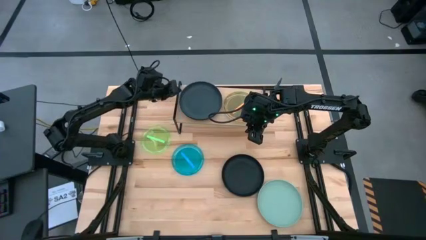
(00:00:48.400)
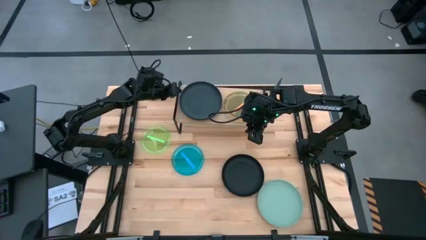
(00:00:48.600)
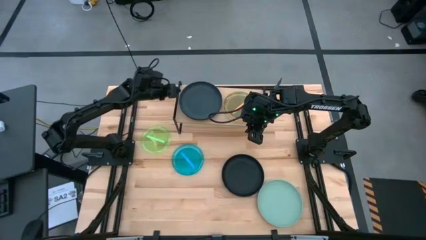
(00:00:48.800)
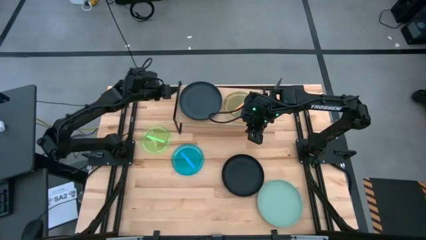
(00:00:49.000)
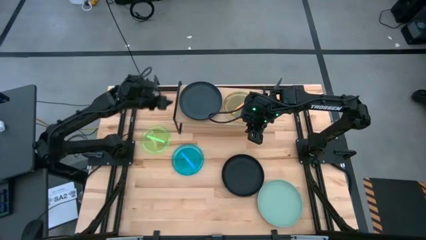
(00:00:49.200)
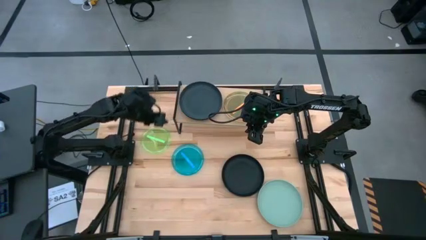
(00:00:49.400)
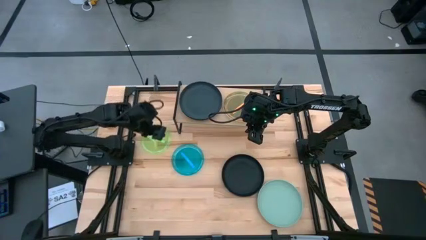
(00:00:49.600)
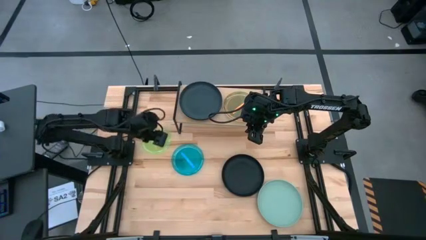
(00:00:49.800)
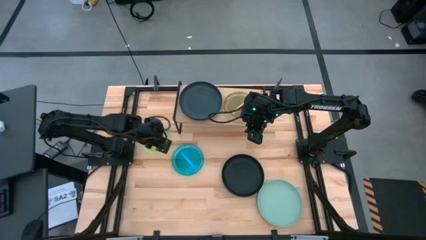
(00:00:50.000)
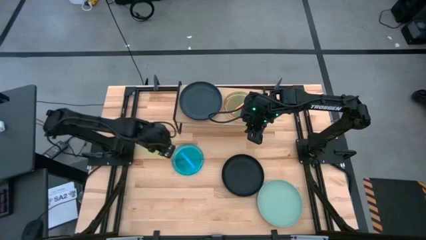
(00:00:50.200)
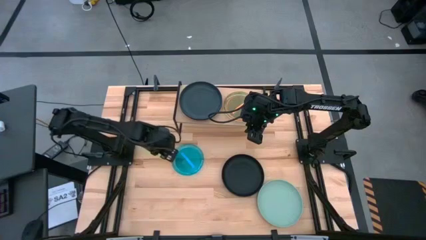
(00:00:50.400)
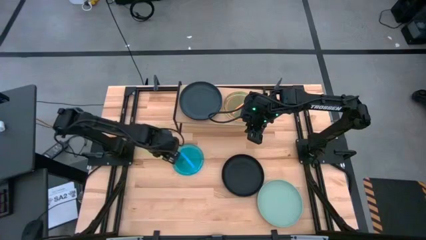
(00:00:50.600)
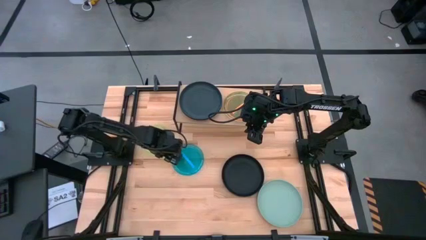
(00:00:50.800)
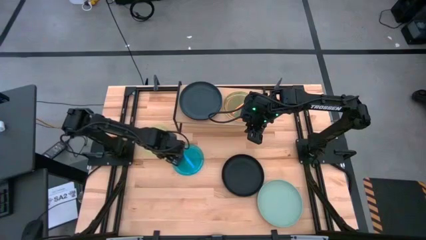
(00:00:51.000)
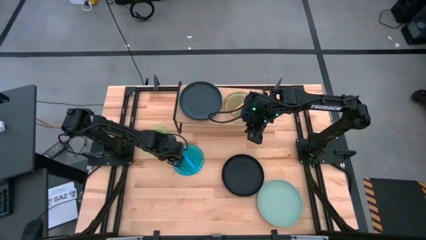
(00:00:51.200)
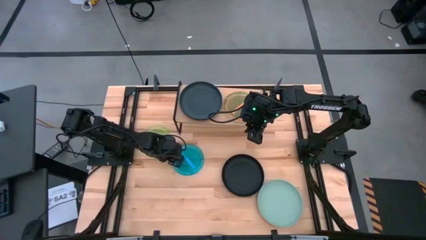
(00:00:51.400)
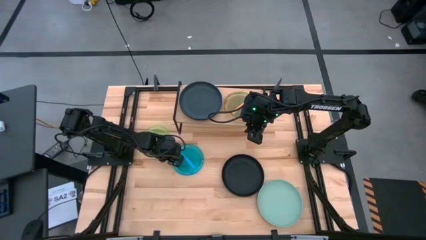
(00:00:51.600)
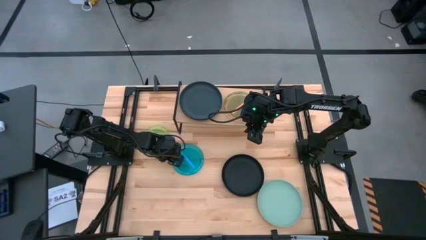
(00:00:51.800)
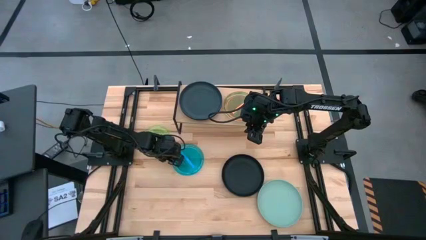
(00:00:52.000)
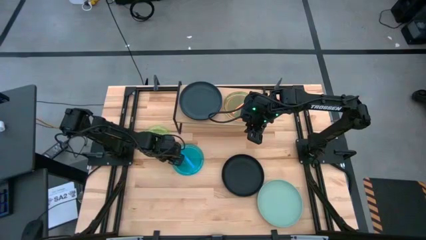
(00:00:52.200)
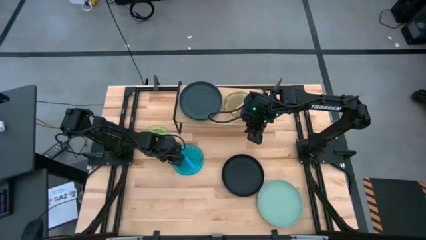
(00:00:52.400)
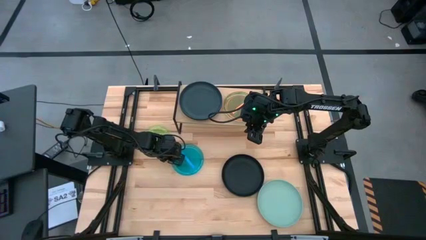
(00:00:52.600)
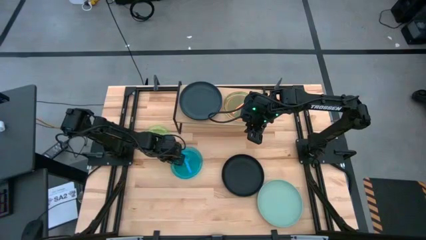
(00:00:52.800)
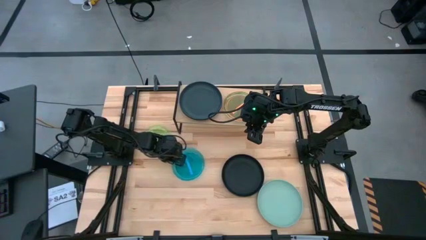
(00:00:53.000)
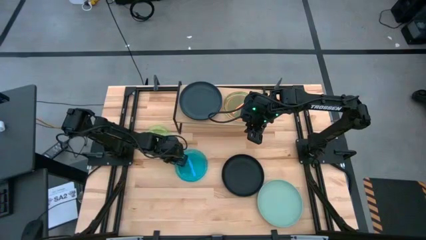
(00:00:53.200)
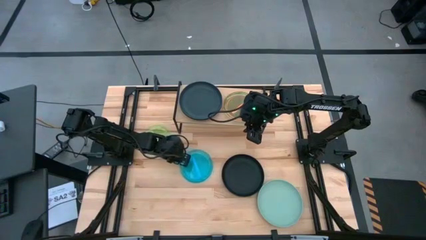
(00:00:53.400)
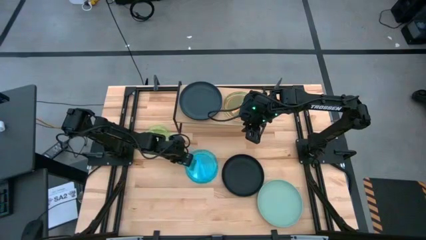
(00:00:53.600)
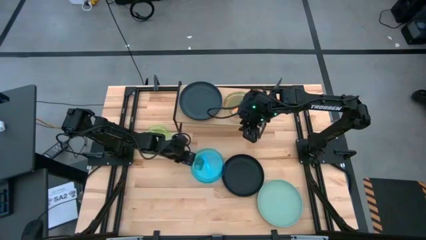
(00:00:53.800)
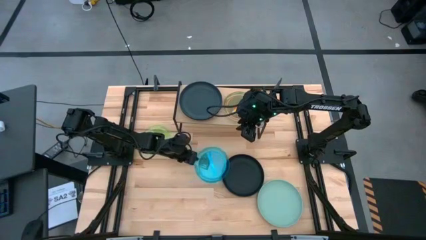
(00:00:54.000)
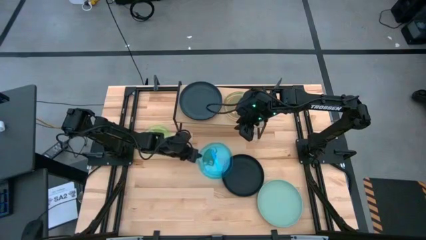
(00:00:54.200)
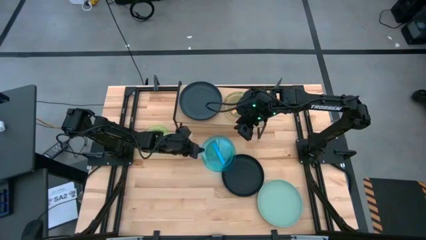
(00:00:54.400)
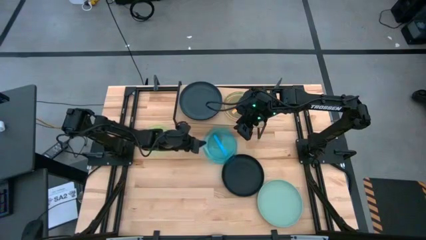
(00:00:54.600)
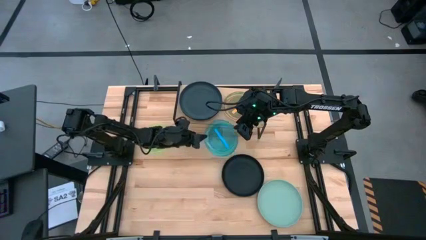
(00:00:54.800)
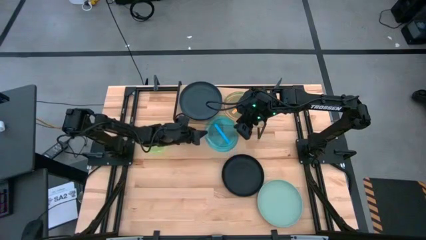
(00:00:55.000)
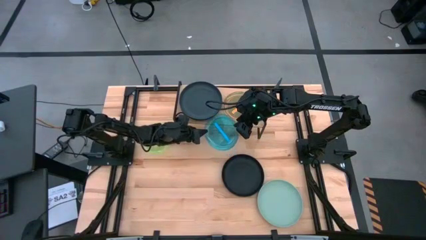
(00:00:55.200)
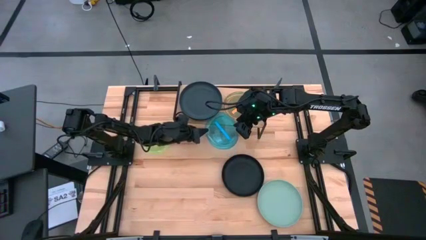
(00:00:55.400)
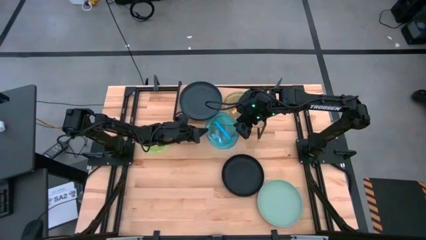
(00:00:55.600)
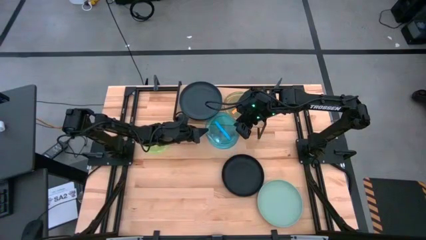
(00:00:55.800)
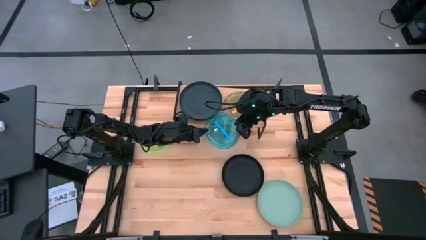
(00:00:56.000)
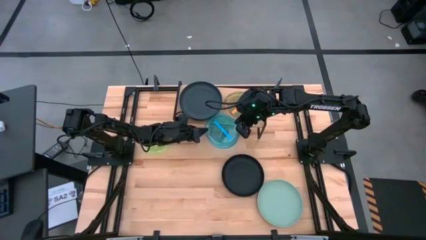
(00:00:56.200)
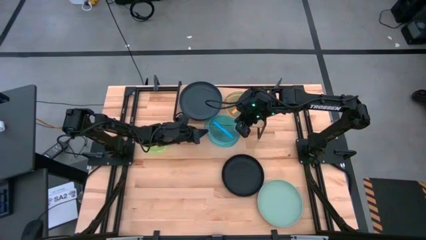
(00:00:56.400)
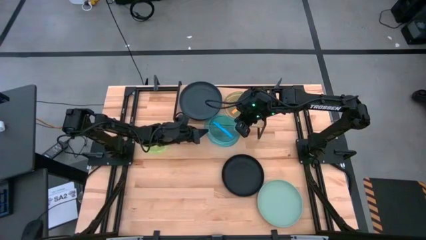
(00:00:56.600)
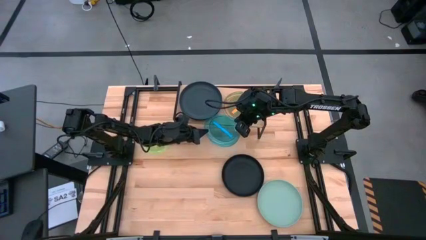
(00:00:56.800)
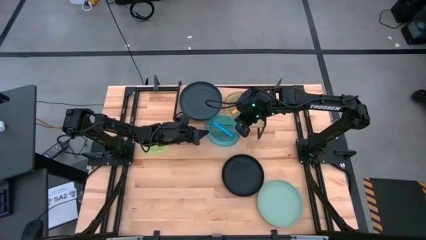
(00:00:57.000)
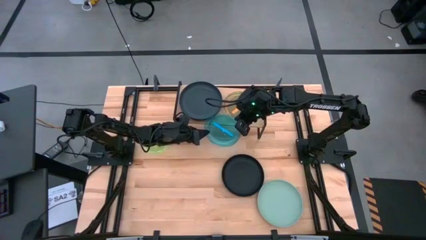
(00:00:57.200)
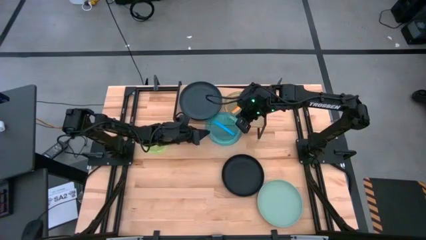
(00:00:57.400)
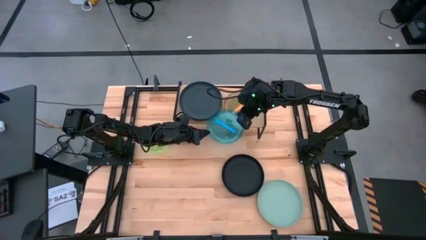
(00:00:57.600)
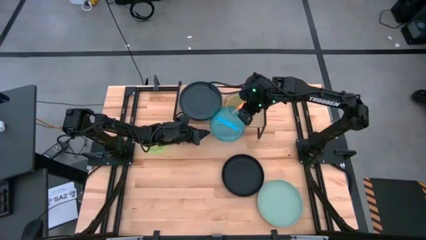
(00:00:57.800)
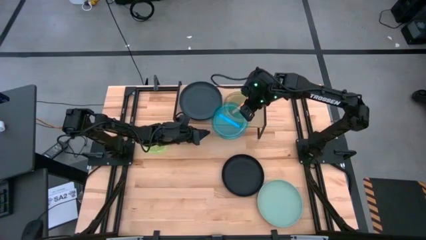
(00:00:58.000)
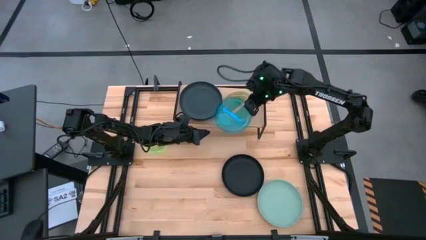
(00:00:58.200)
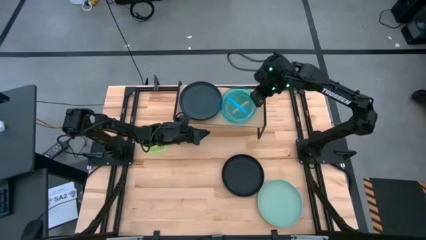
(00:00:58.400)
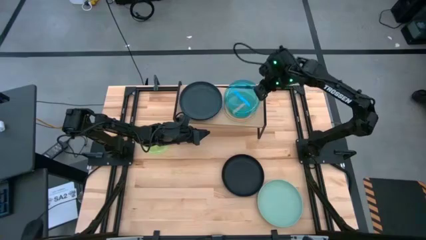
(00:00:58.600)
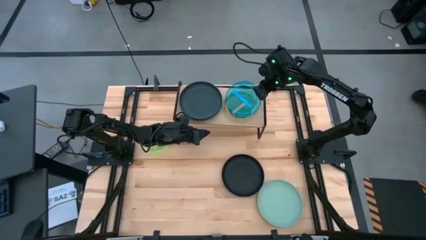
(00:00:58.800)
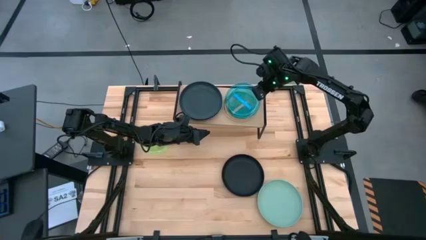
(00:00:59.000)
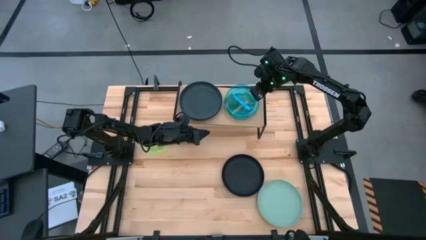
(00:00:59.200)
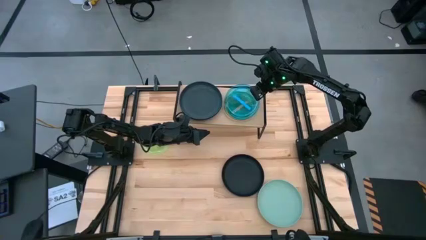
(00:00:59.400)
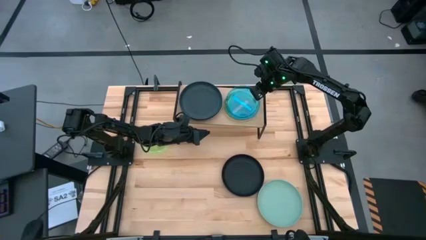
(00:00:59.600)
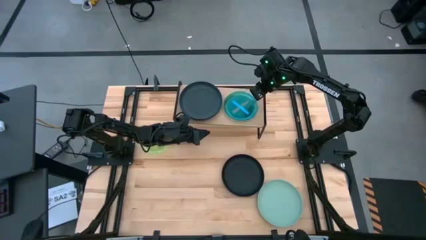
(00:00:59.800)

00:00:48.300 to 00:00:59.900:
Task: Place and stack plates onto a shelf
Stack the blue plate on top of the orange plate on the shelf

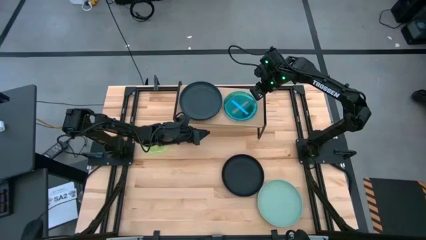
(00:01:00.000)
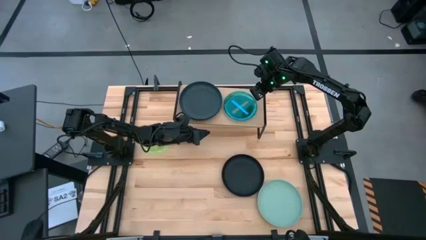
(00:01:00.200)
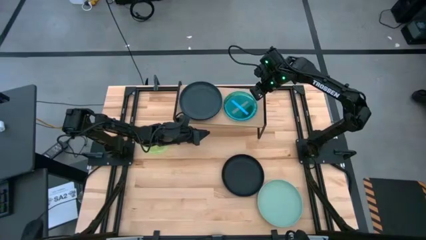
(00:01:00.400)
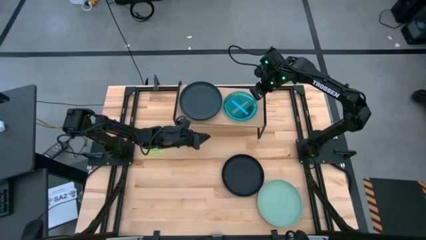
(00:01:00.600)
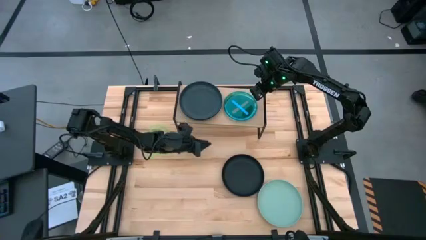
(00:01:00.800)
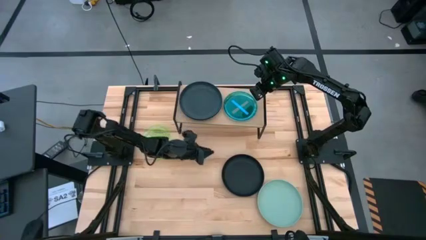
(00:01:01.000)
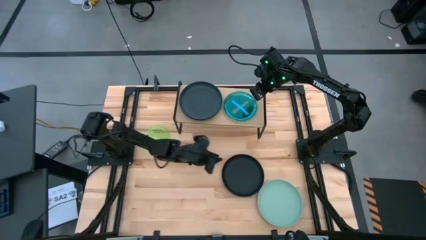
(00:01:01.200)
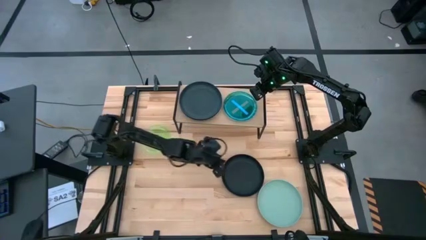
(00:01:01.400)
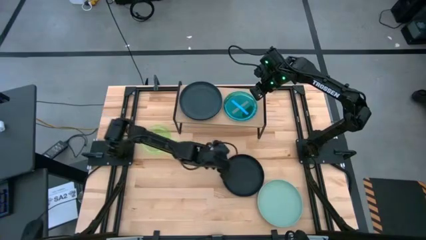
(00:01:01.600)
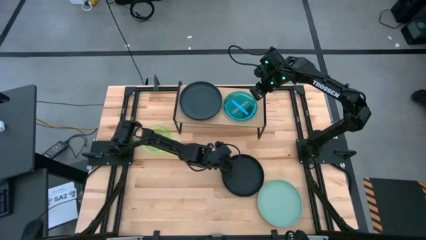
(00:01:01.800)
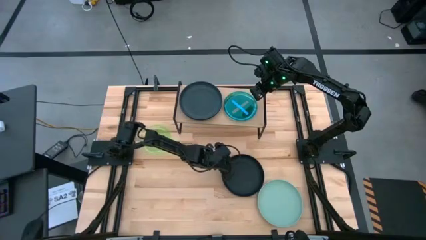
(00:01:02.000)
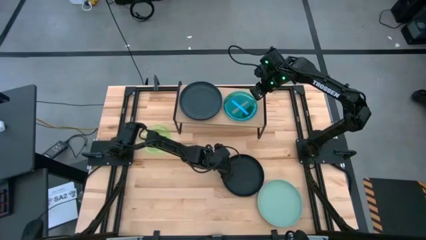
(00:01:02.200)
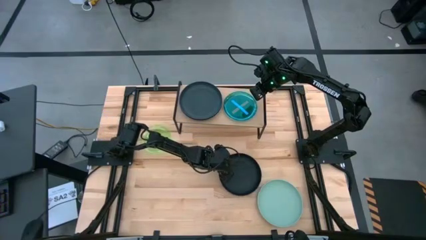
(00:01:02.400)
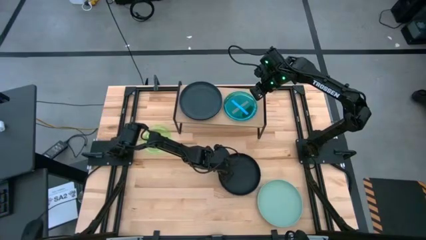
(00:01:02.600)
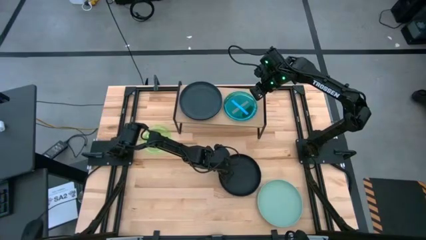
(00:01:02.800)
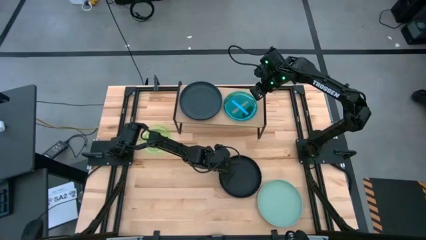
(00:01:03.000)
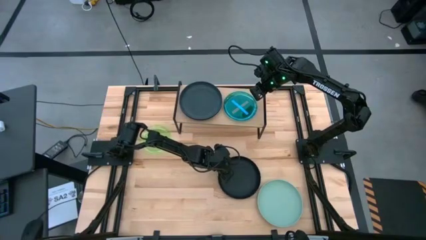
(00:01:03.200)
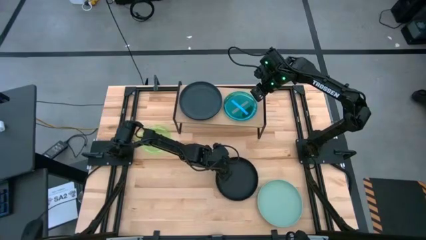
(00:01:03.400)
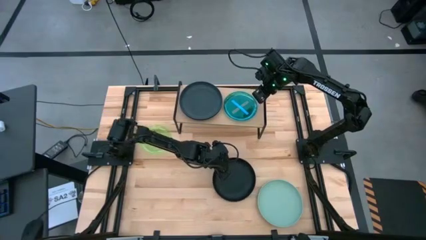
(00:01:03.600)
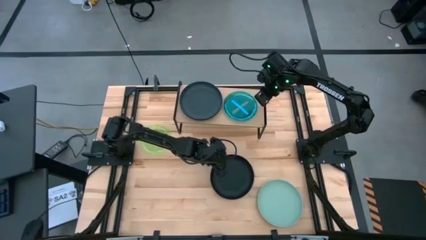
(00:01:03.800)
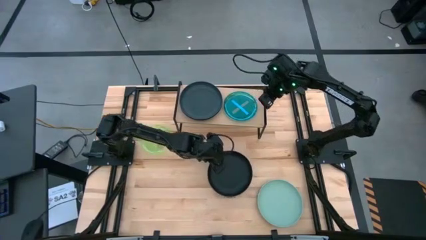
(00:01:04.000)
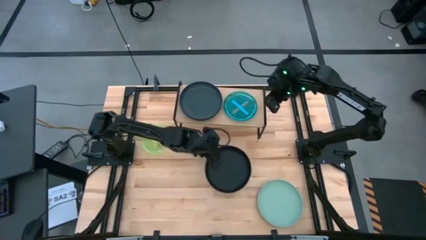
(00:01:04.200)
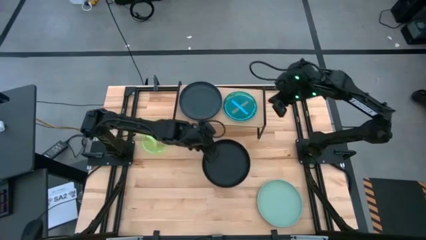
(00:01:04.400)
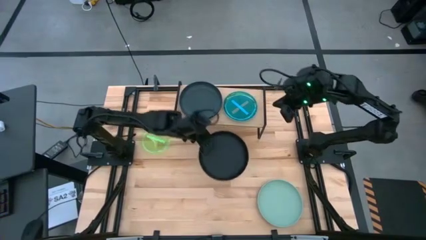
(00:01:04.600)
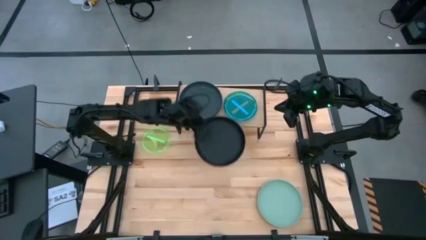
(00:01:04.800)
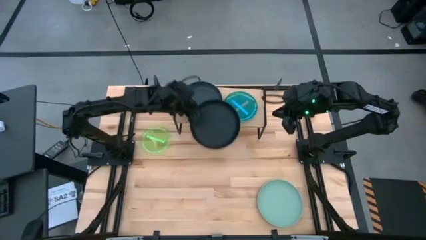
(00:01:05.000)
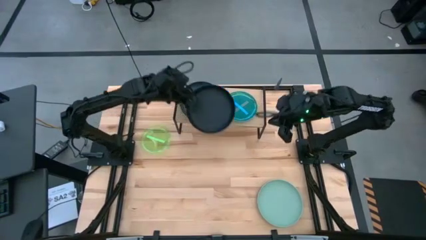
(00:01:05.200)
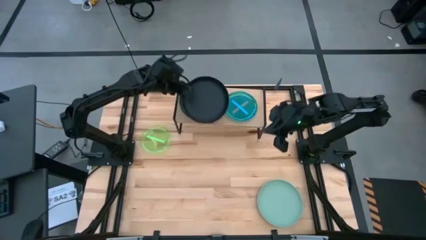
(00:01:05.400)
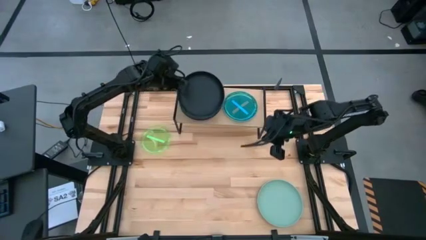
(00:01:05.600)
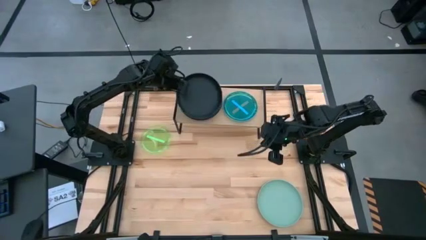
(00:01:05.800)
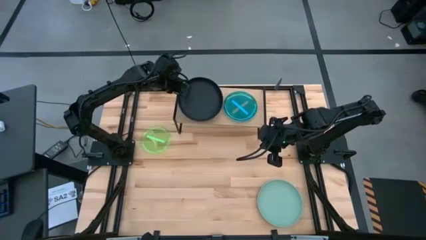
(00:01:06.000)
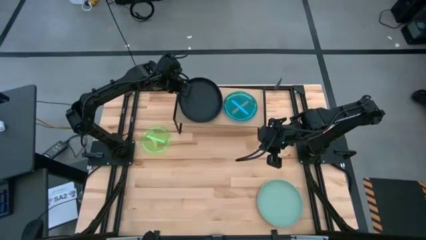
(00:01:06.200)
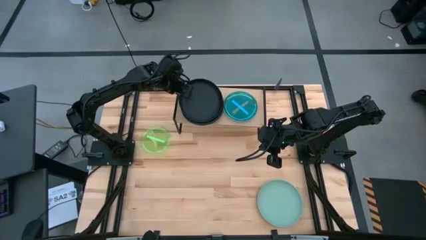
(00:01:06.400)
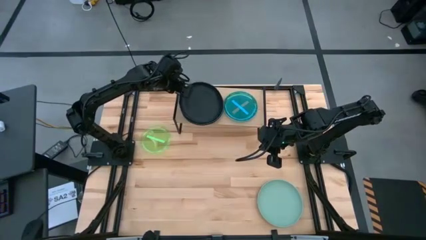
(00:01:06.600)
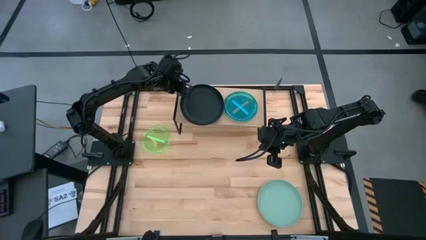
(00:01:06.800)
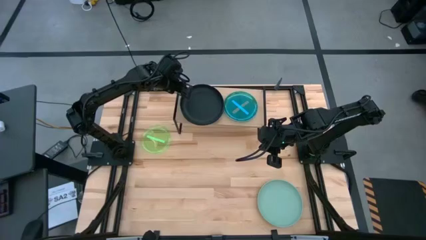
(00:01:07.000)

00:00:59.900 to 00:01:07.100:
Stack the black plate on top of the black plate on the shelf
